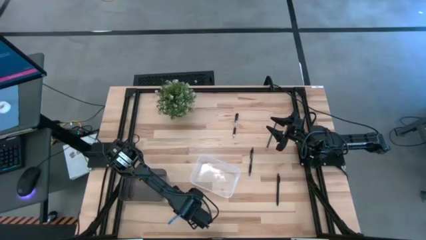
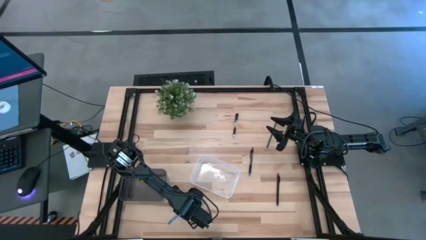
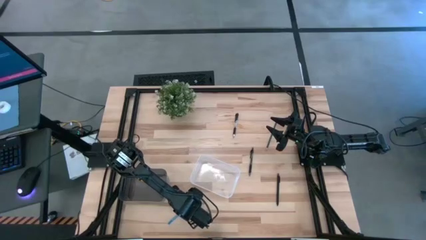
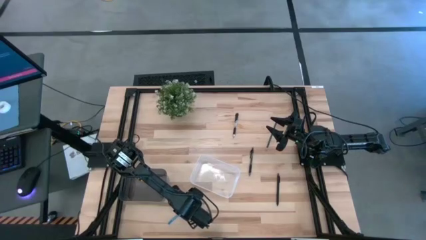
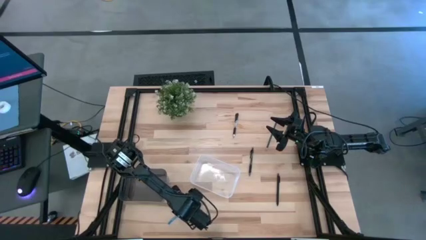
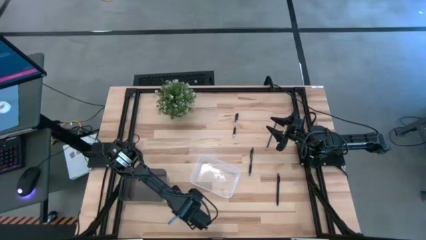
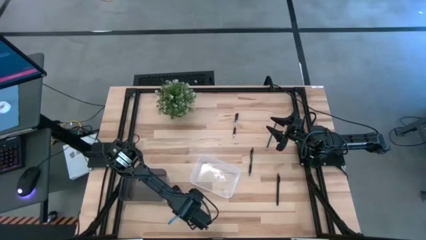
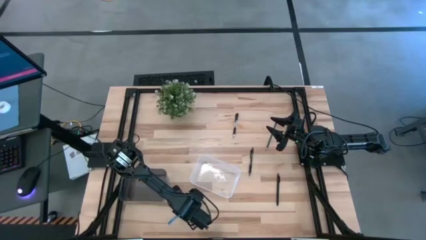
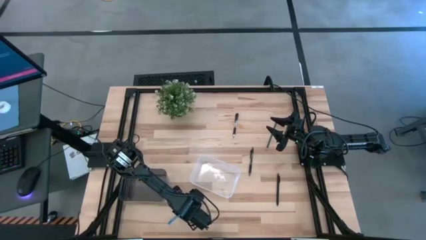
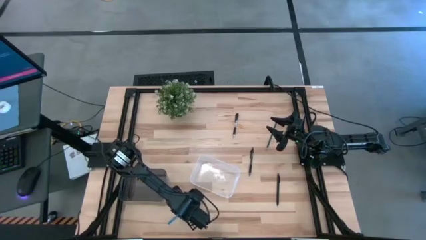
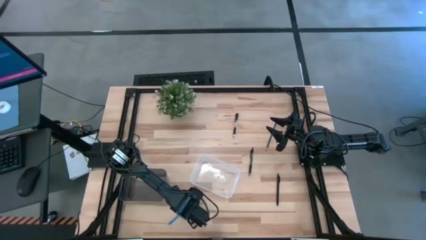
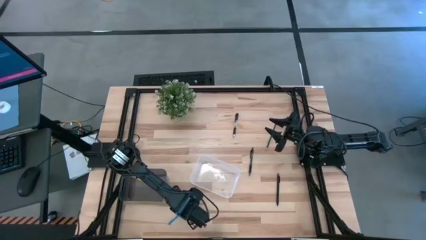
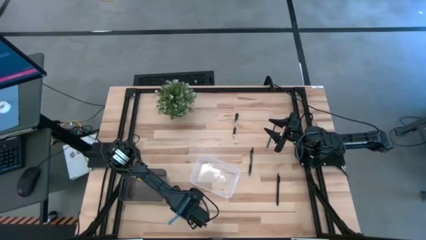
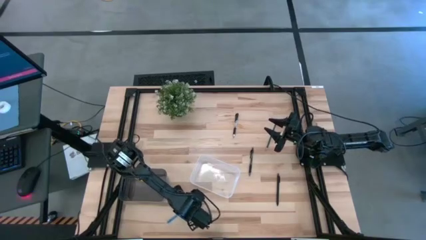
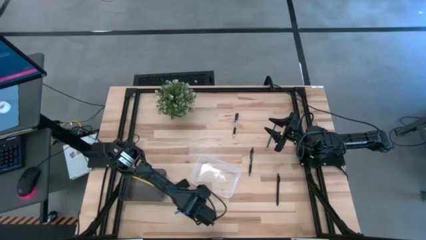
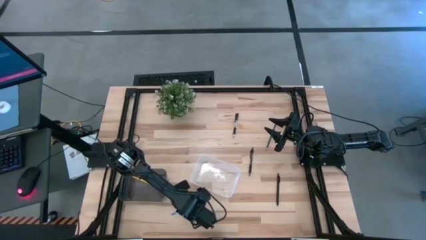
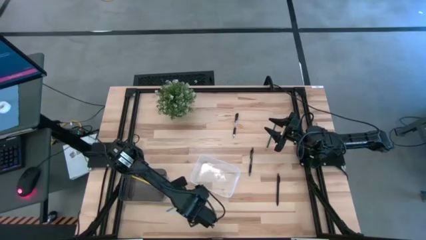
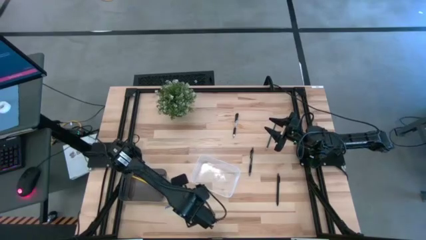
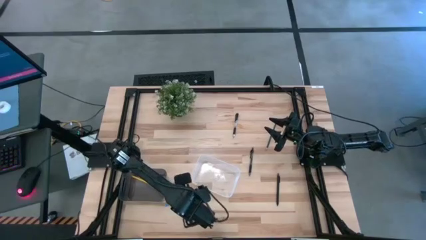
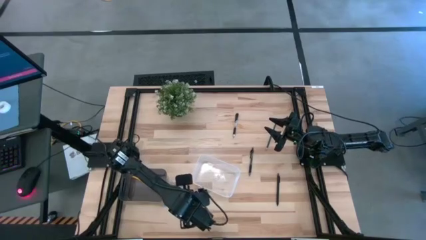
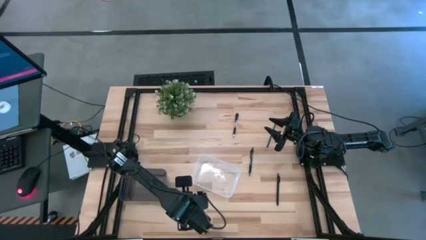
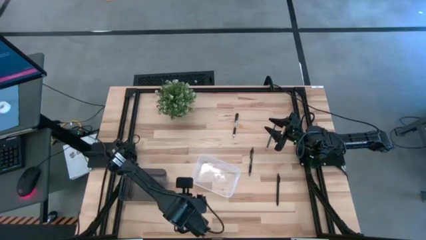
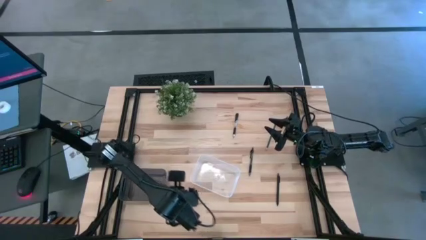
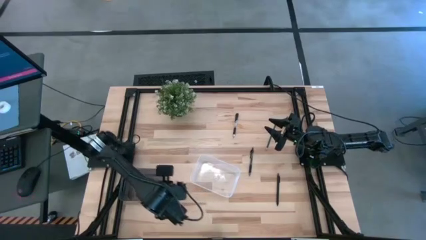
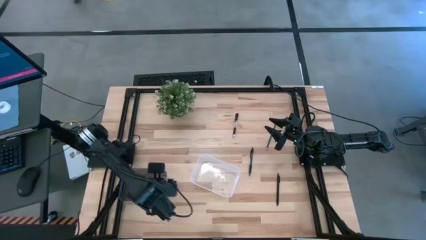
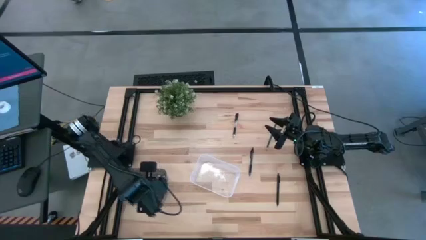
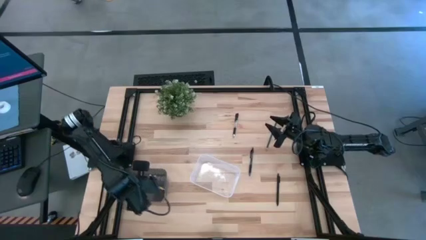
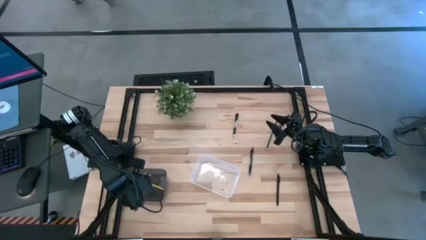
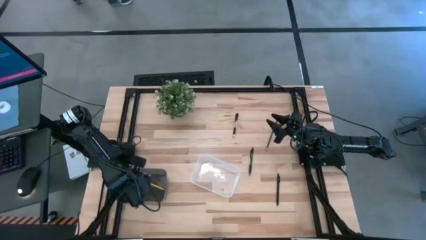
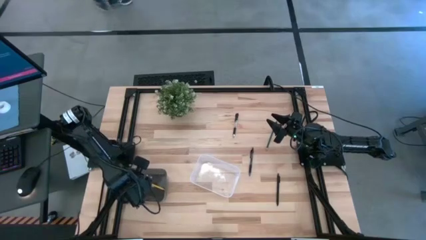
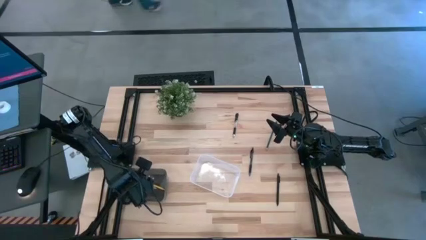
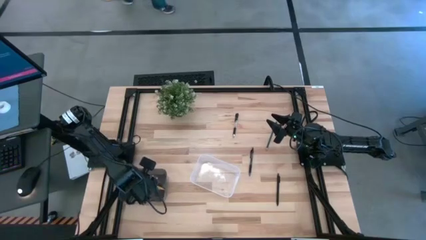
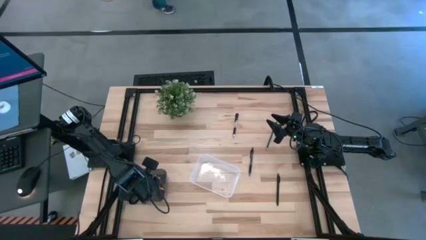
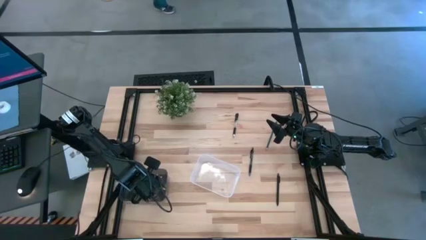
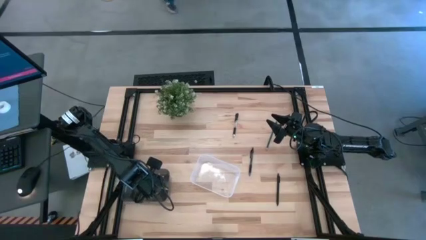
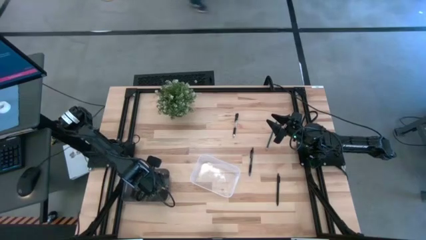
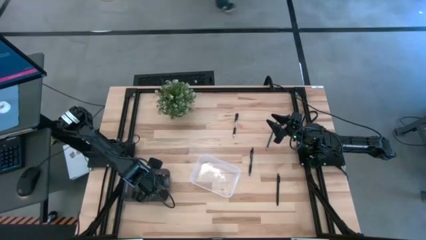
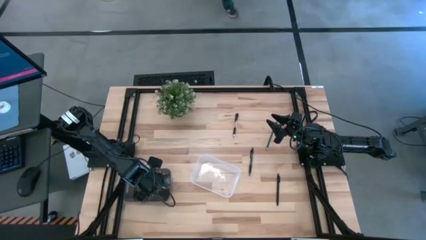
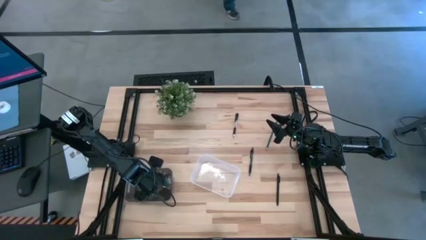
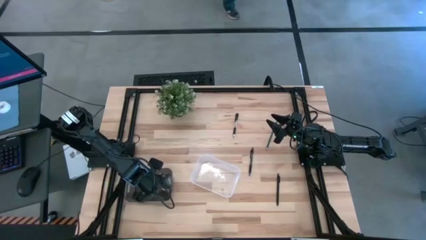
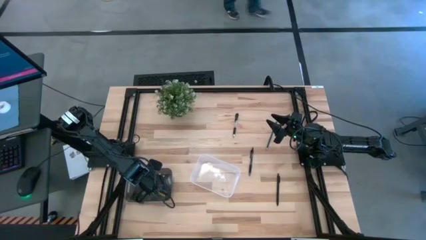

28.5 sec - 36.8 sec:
Task: Sort pens & pencils
Put the blue pencil into the black bin

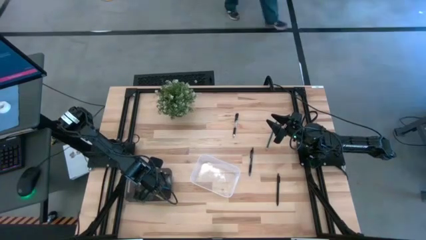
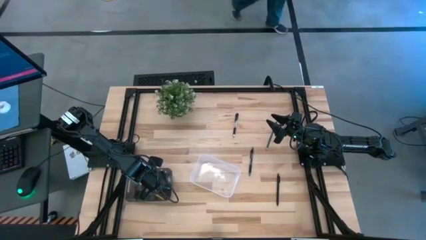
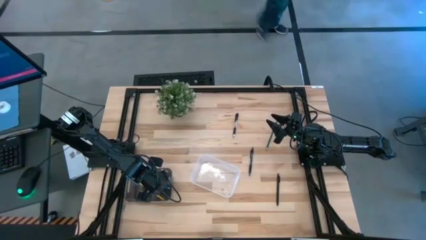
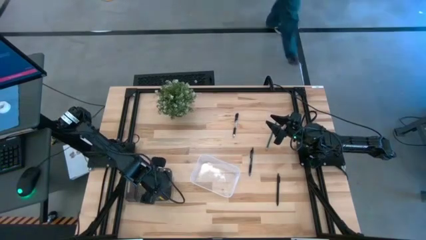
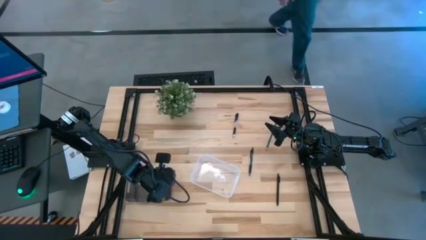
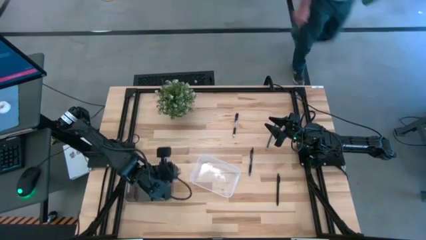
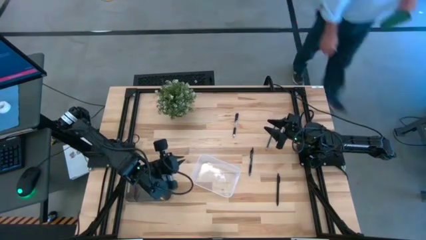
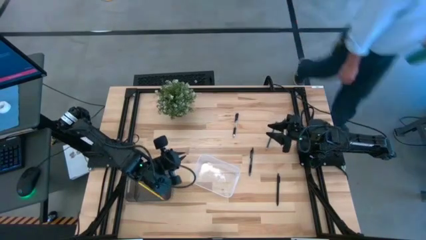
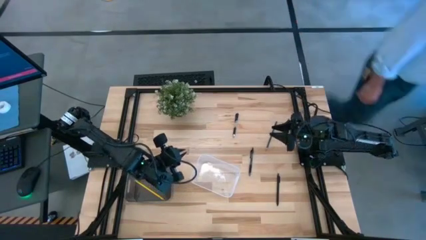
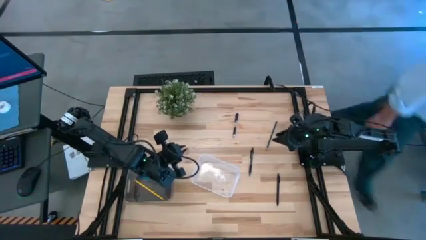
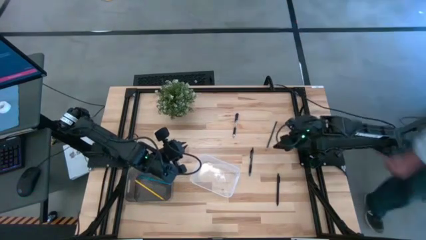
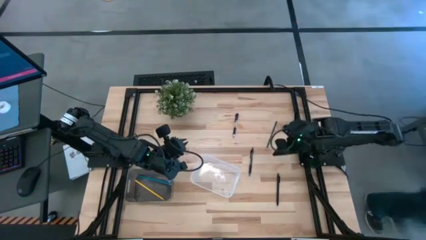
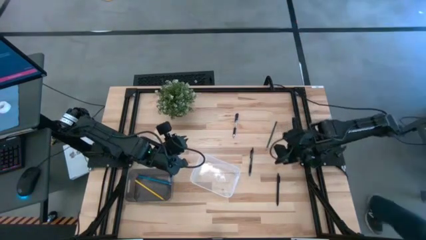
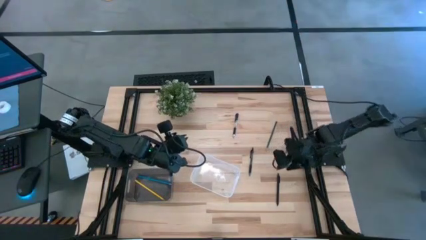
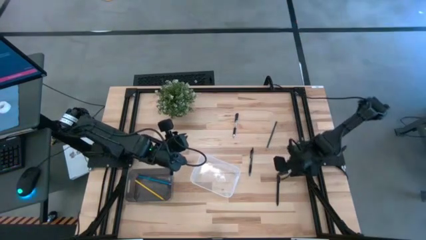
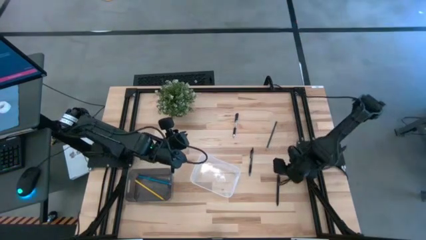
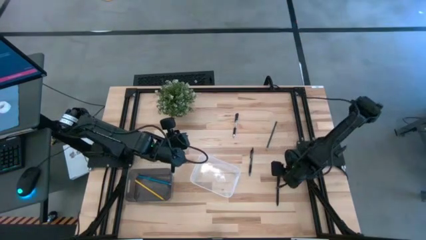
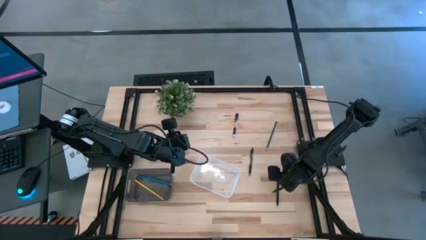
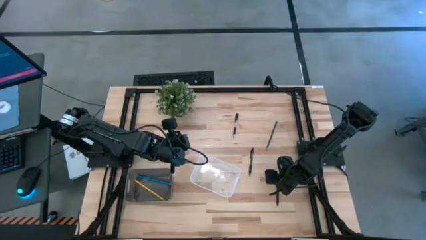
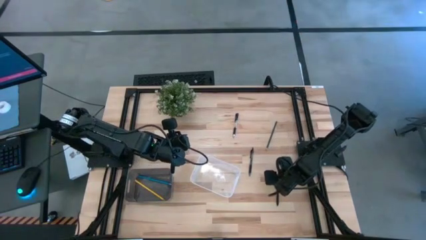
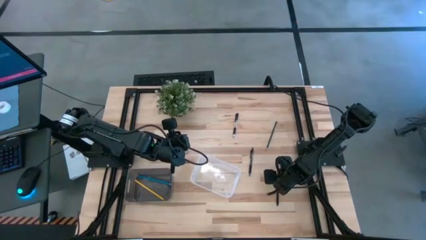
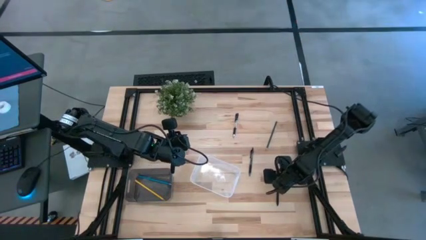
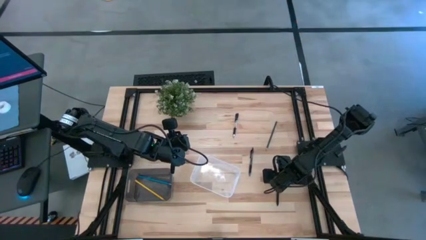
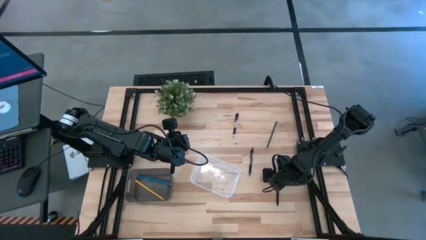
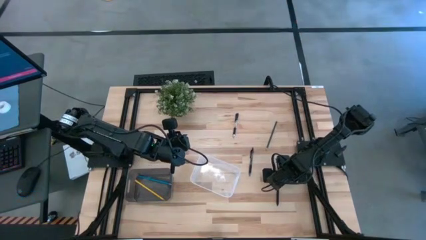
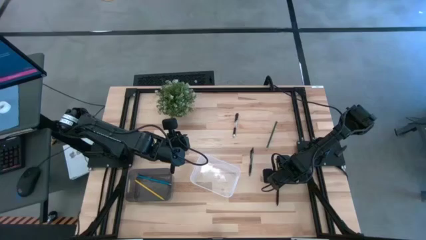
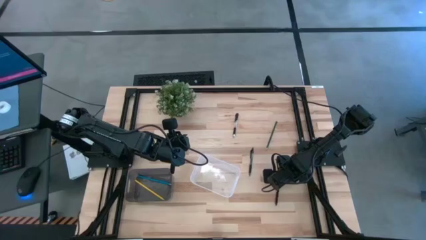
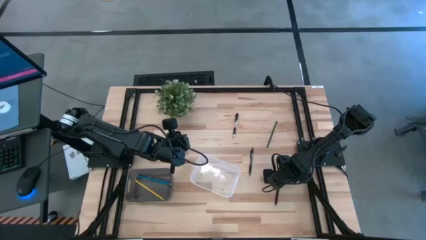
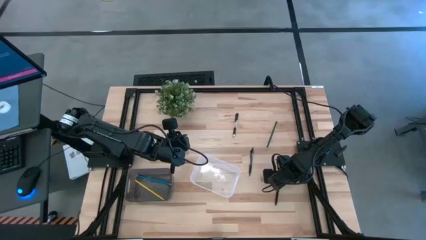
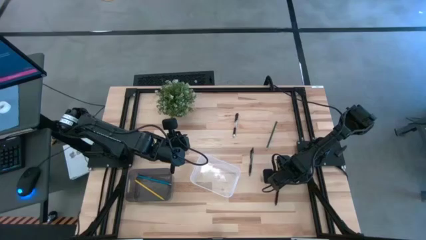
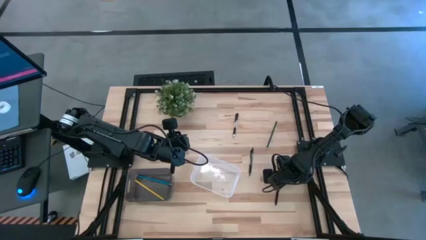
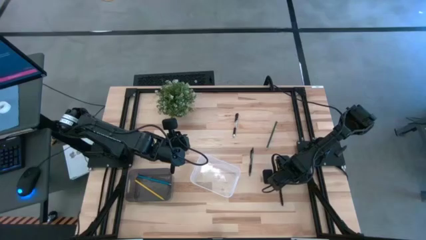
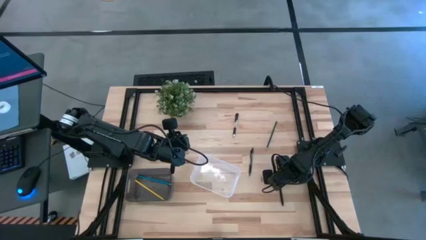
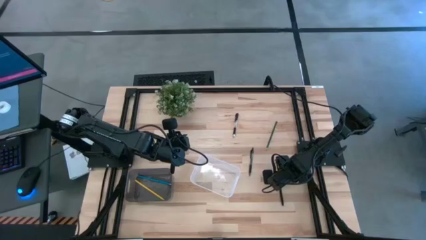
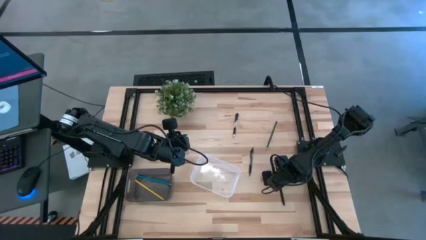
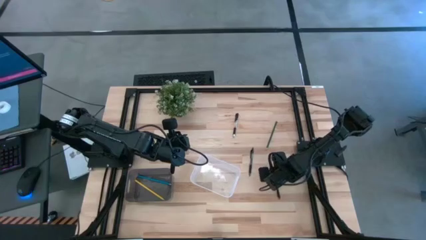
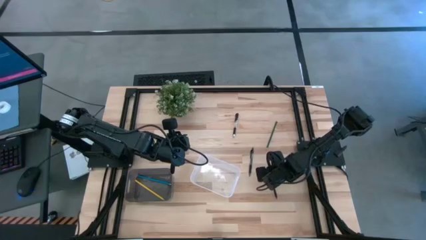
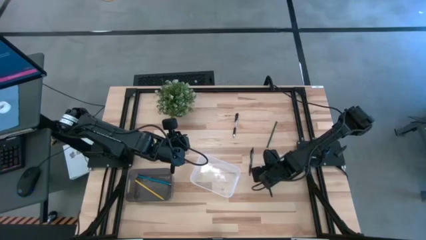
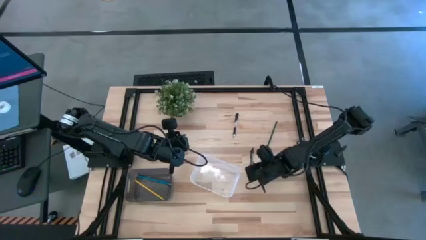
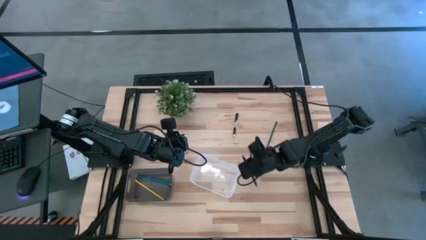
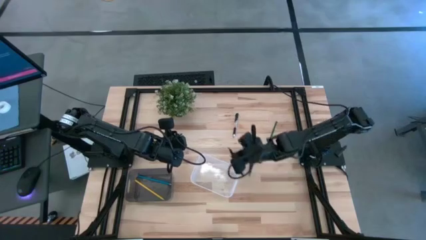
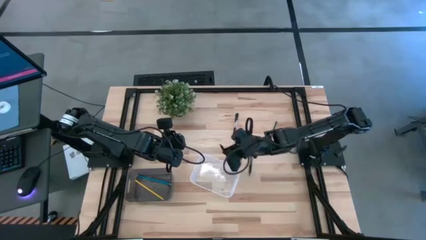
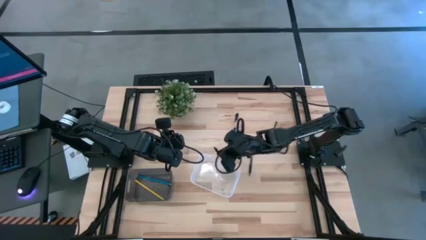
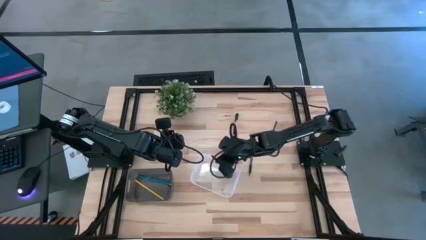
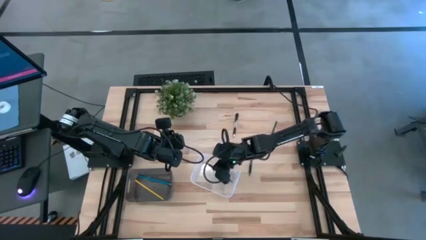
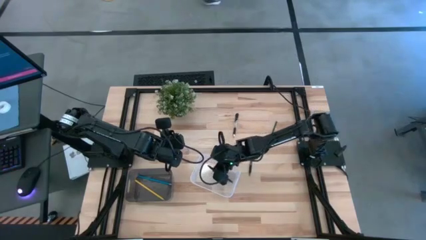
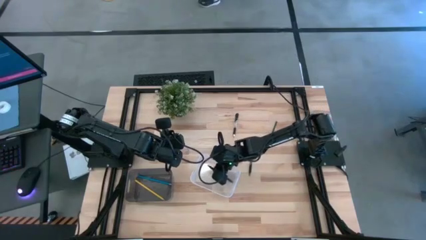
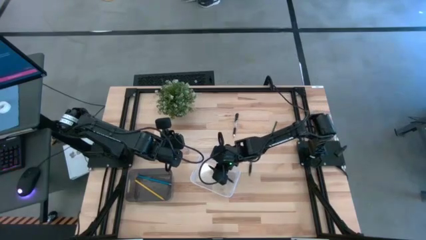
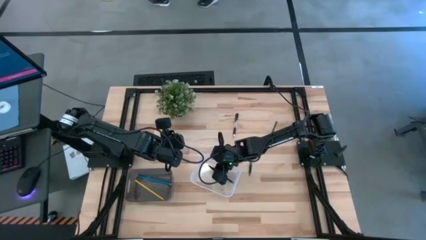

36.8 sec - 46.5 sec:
Put the bottom black pen into the transparent bin
